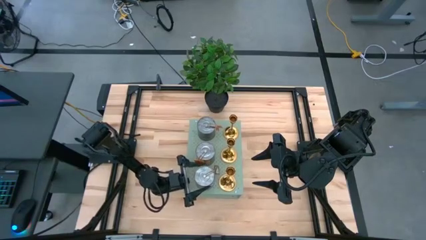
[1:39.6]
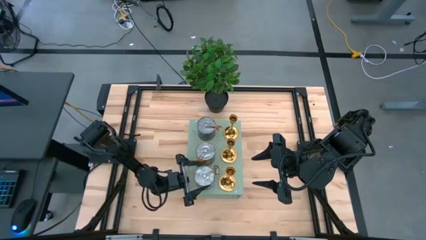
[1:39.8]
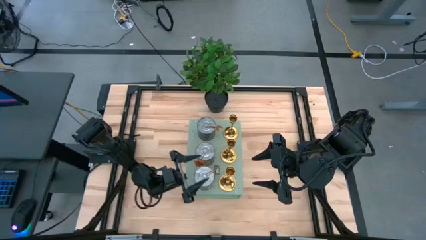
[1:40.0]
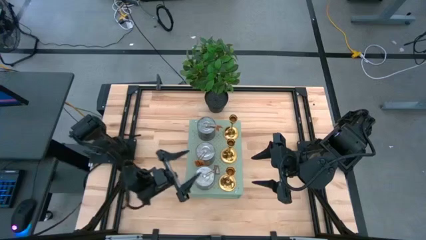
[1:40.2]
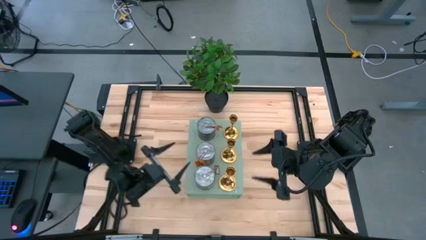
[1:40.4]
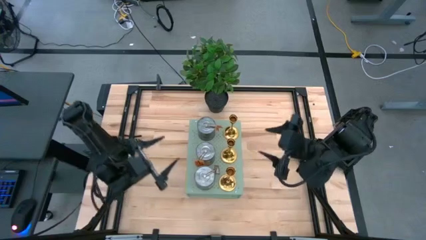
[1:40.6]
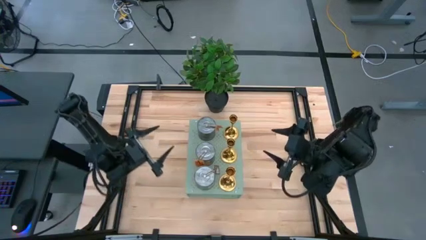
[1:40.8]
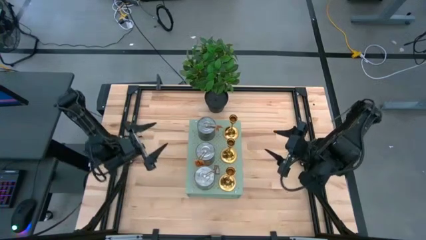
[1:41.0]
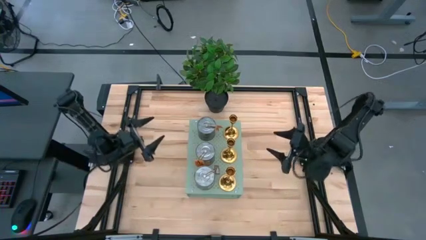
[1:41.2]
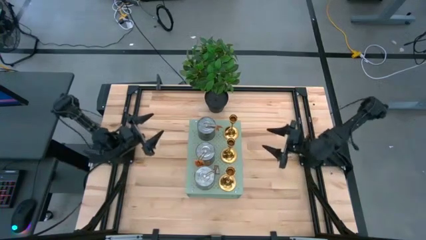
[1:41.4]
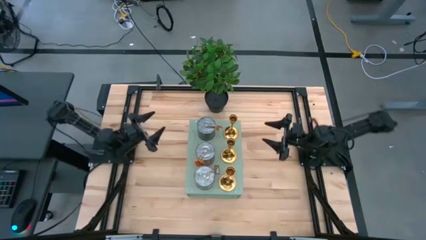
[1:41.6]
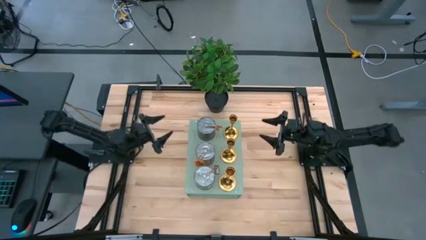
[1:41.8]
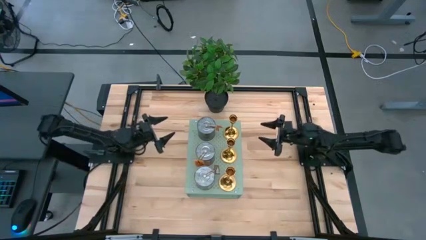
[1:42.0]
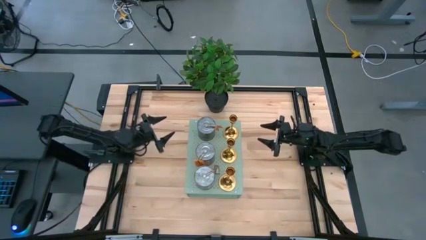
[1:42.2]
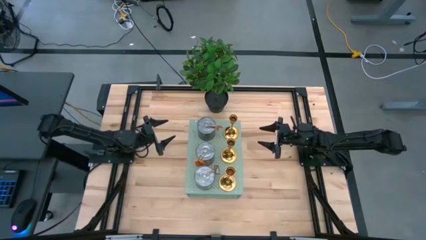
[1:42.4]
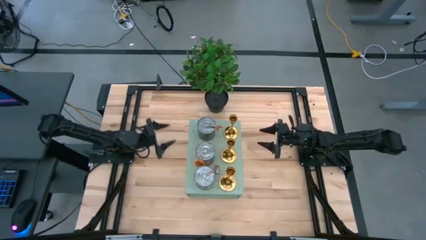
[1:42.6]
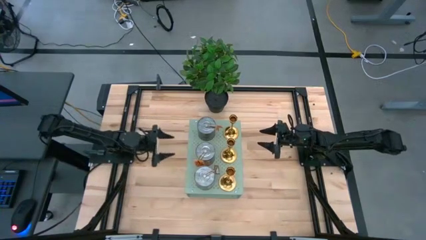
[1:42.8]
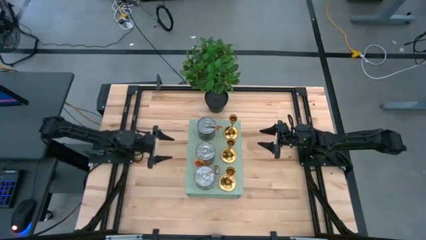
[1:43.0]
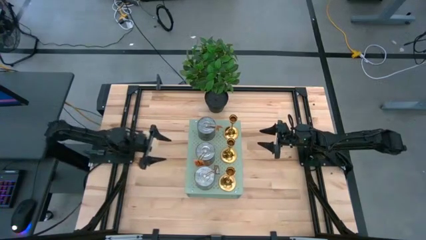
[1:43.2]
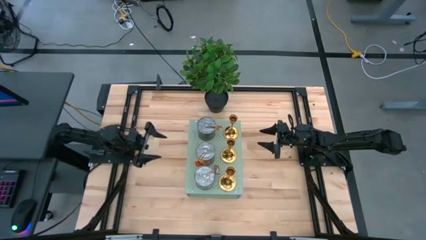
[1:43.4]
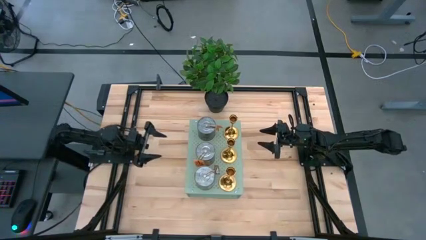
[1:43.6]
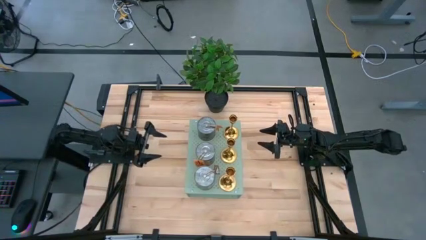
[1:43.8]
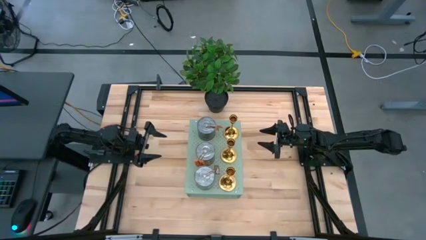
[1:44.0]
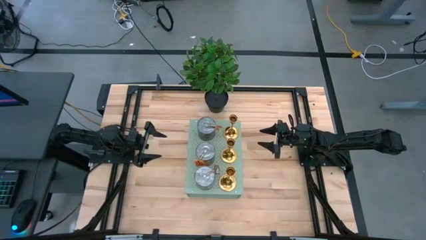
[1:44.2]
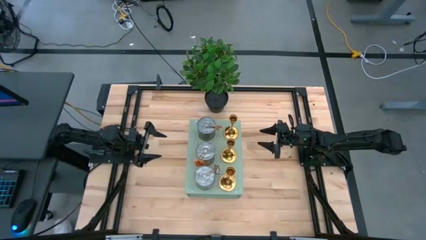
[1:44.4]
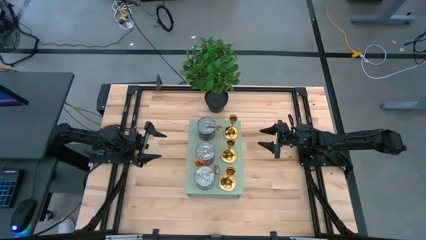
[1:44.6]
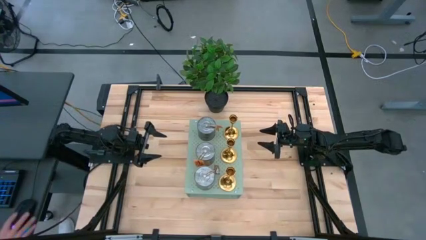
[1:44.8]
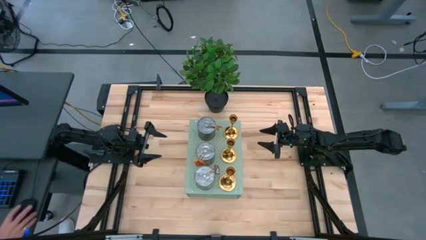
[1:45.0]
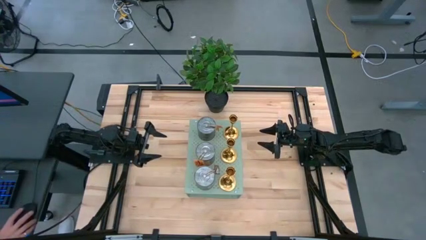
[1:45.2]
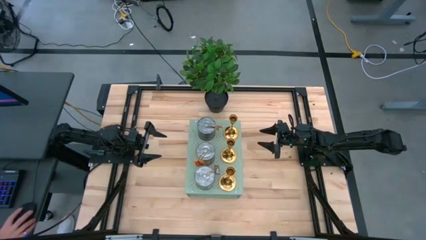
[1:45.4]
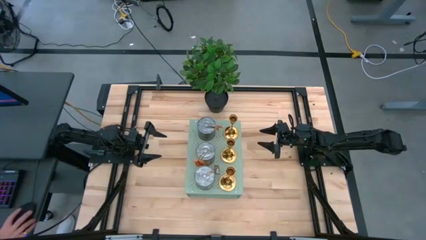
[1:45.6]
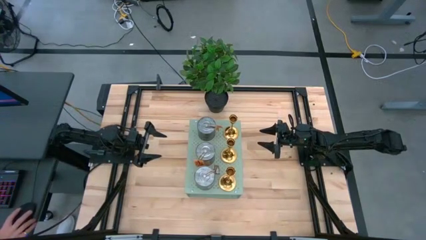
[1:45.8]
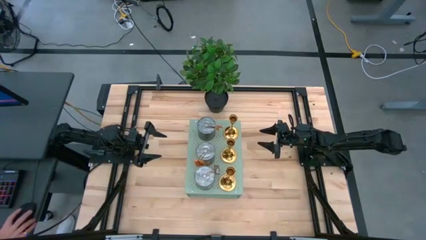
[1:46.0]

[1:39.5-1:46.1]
Task: Pick & Place candle stick holders
Return to Home Position

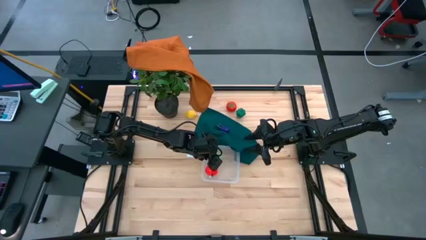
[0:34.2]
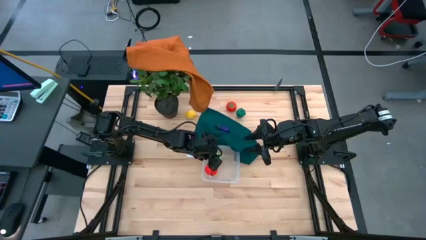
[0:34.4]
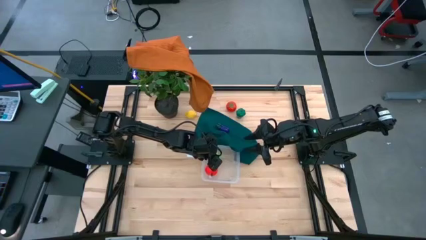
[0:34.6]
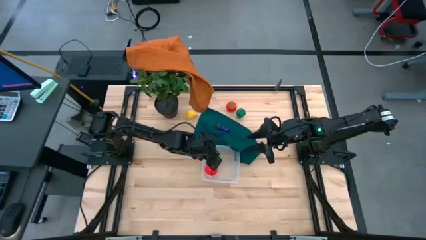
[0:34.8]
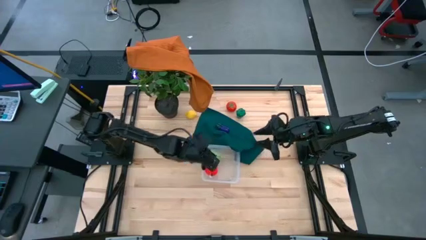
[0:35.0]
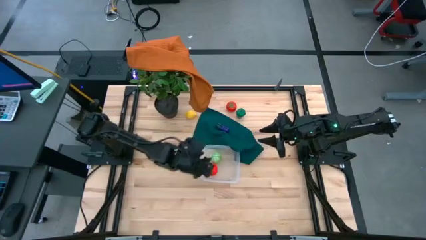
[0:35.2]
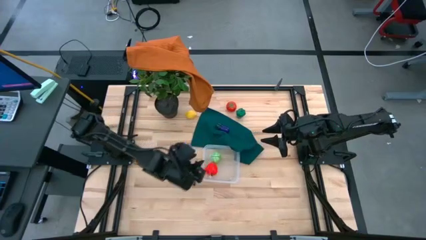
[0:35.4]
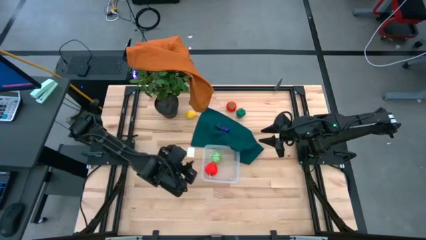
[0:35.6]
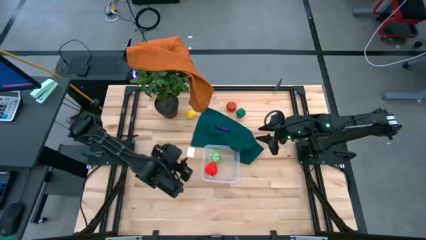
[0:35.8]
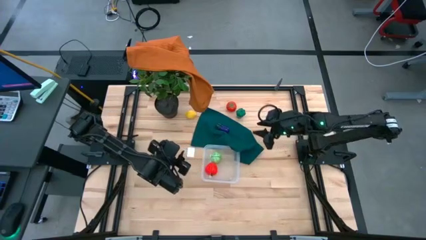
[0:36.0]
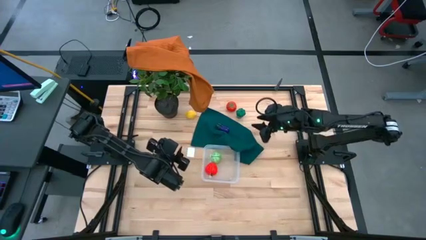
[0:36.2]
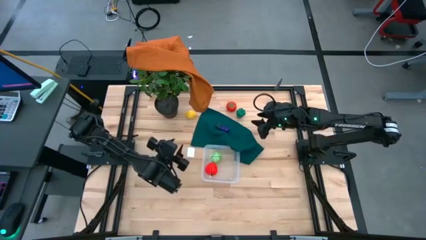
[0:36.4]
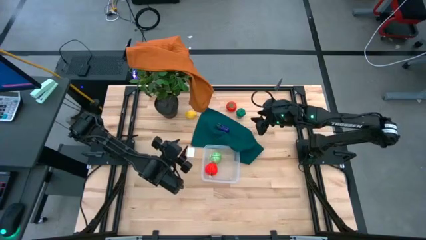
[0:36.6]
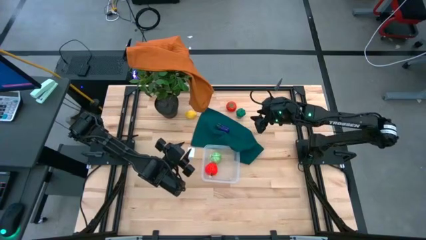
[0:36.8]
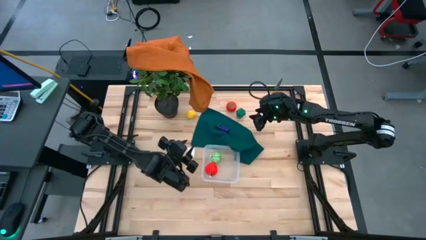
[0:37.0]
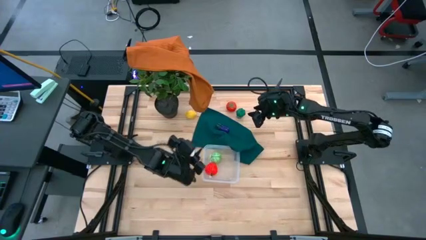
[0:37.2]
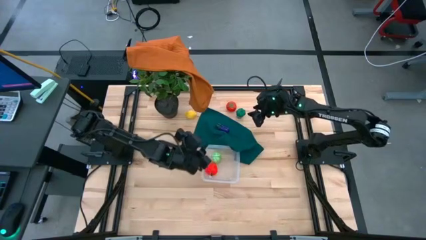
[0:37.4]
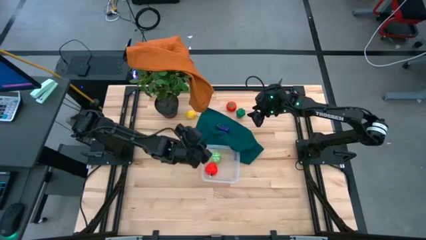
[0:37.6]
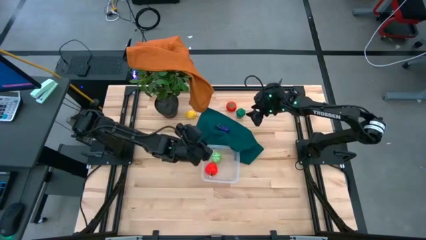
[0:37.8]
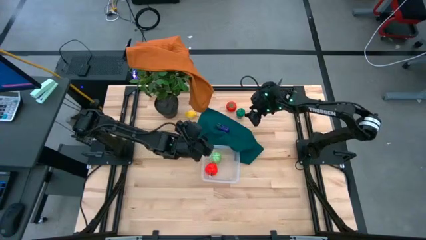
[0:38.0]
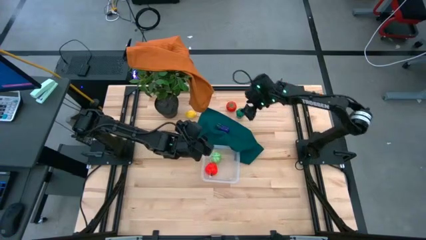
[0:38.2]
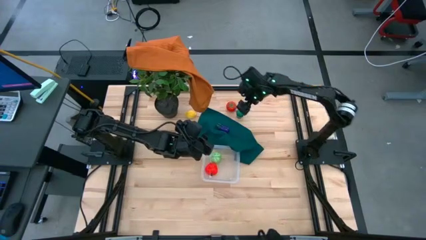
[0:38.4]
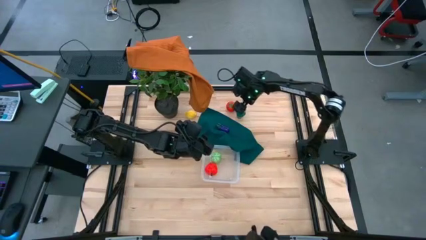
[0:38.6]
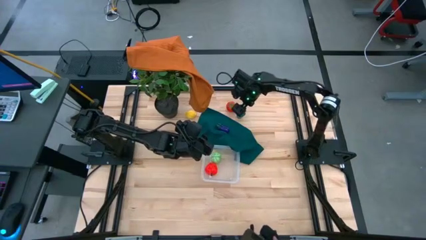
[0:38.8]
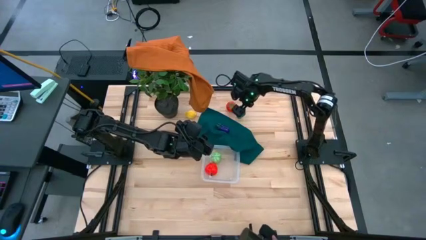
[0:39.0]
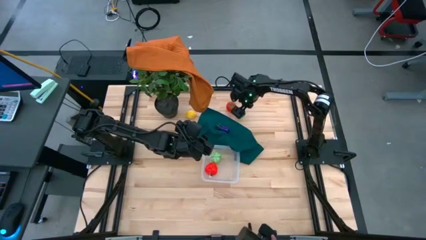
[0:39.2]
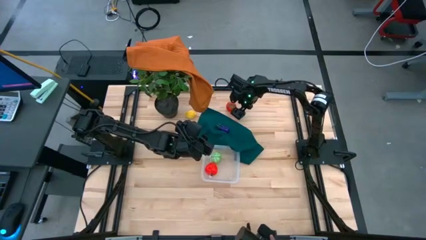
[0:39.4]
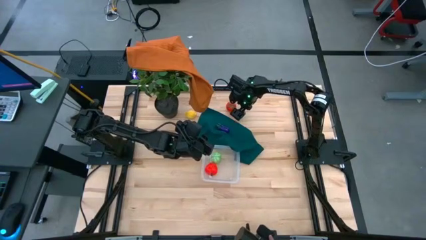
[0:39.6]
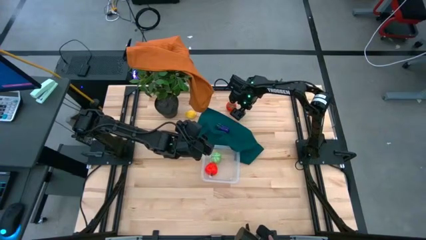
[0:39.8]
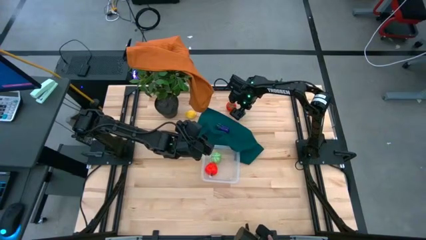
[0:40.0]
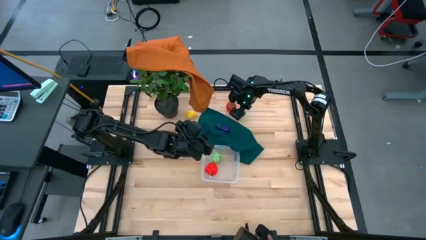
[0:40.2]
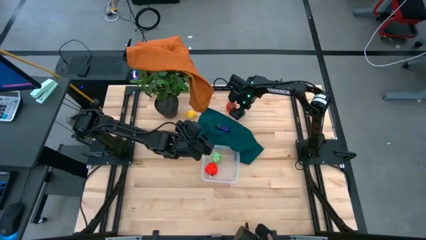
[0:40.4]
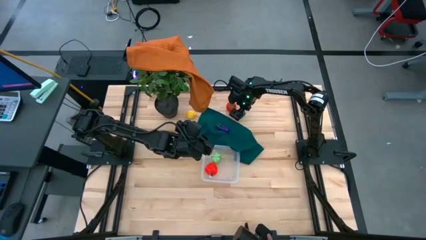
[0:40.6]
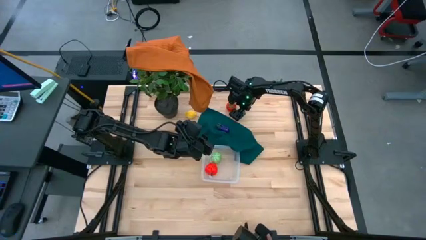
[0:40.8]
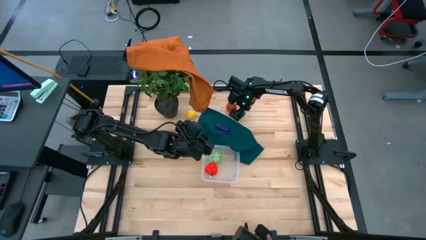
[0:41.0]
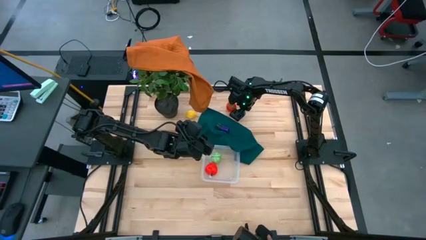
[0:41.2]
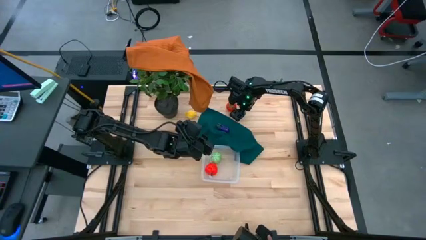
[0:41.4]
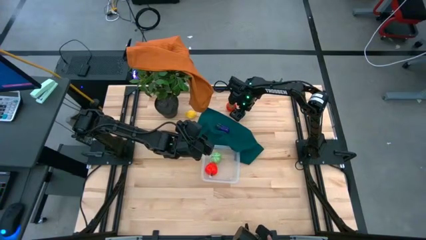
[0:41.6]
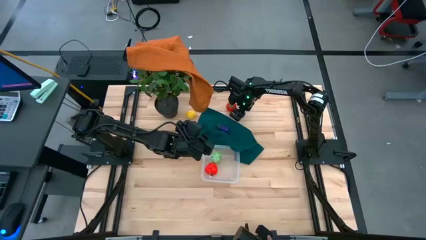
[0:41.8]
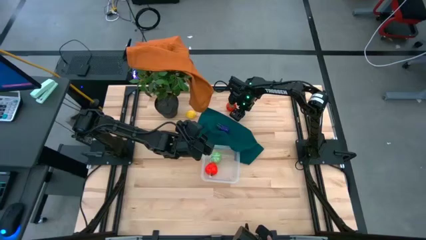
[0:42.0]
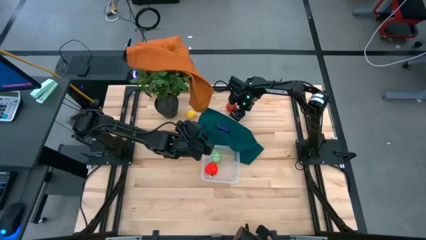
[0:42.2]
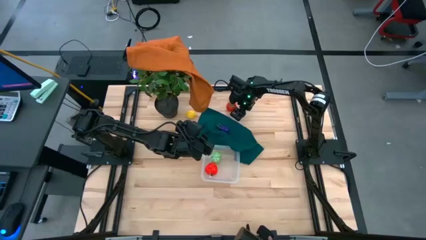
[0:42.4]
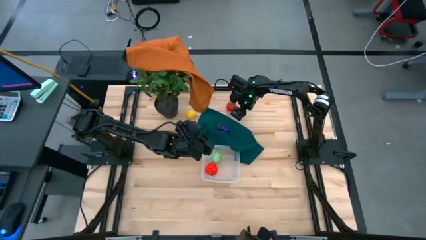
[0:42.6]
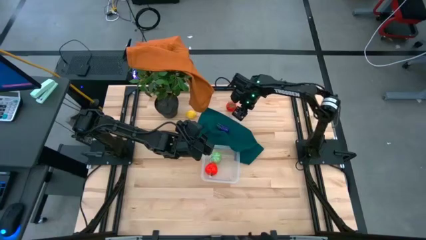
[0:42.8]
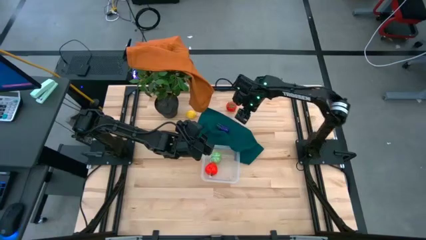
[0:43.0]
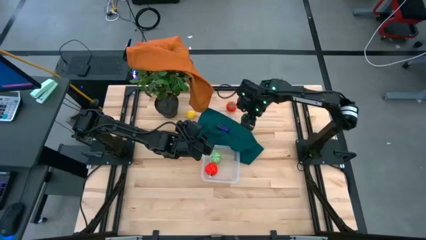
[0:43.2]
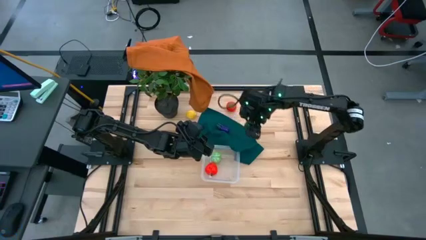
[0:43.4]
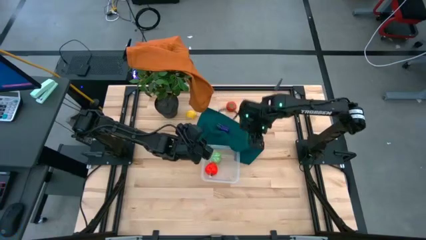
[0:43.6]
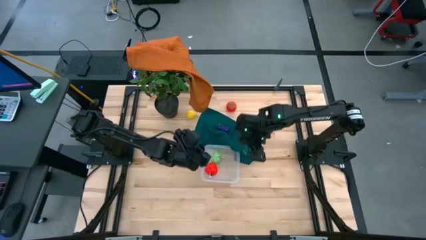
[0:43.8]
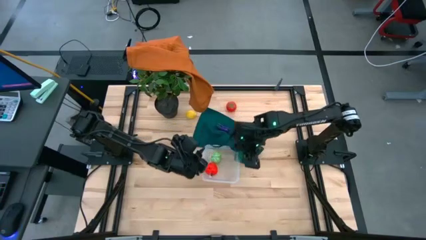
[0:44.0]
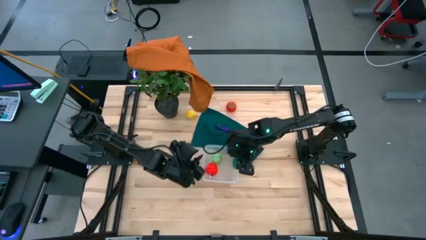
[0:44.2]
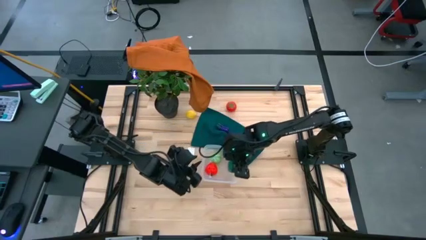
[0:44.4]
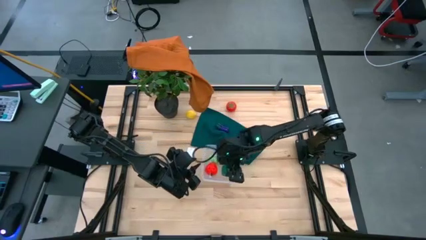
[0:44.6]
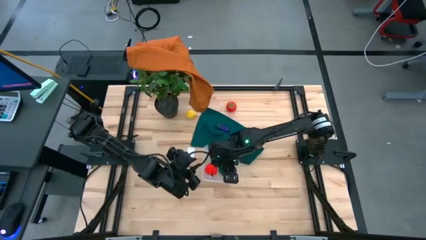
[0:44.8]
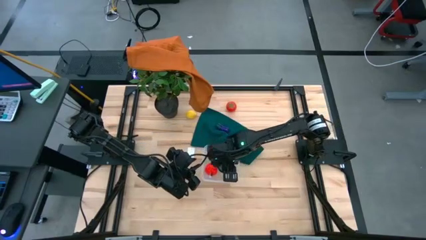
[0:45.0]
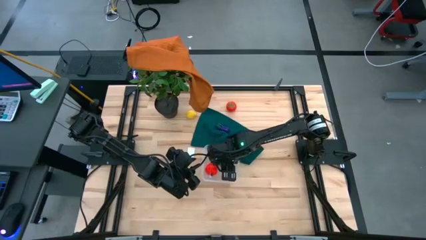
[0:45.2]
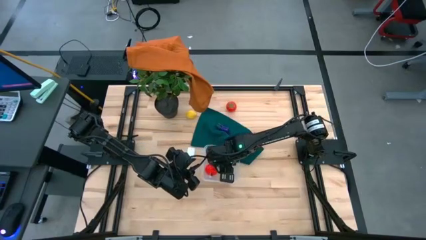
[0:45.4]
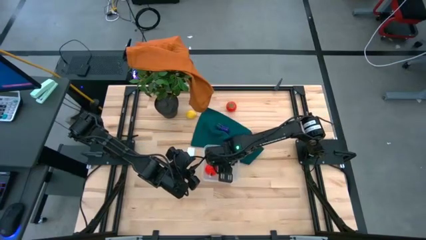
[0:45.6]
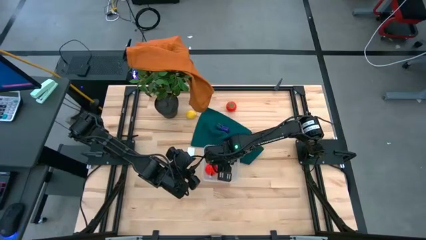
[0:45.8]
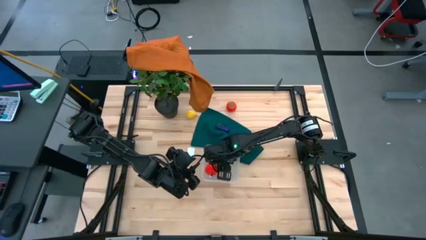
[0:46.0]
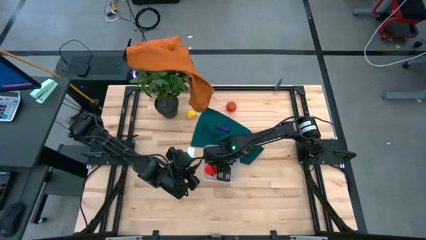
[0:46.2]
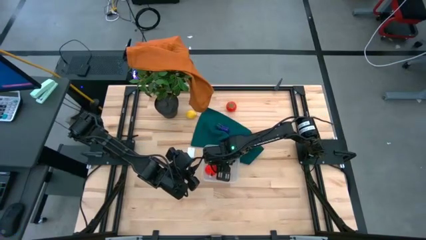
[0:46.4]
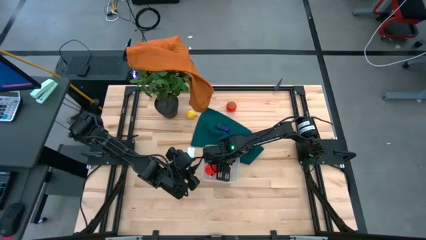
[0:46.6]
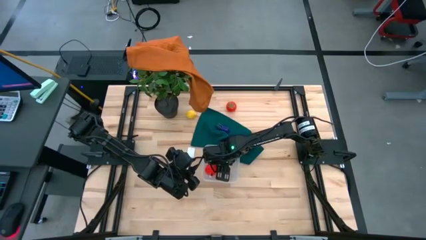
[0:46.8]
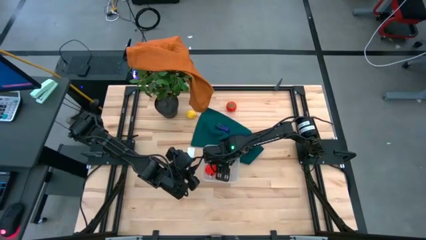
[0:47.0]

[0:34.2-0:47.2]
Task: Pick and placing Produce into tupperware
Put the bell pepper into the transparent basket
